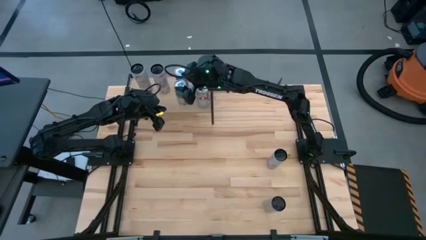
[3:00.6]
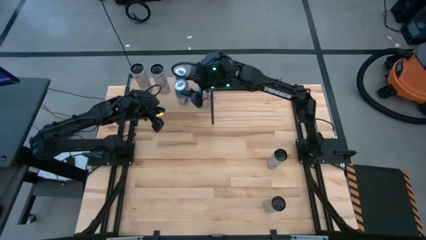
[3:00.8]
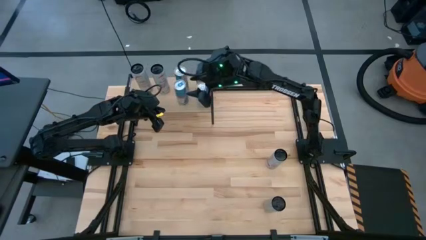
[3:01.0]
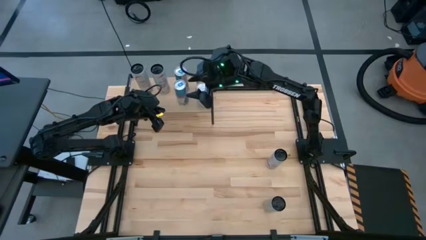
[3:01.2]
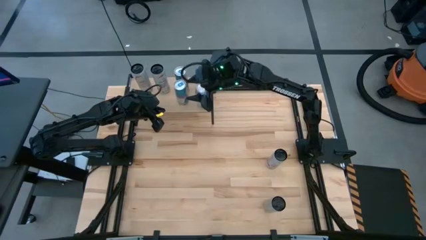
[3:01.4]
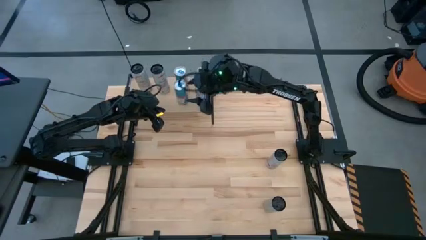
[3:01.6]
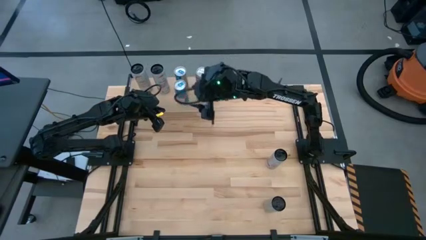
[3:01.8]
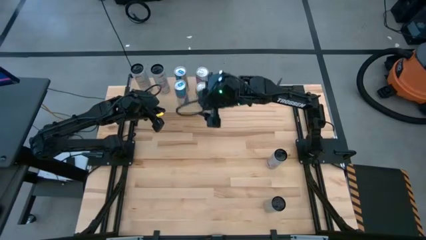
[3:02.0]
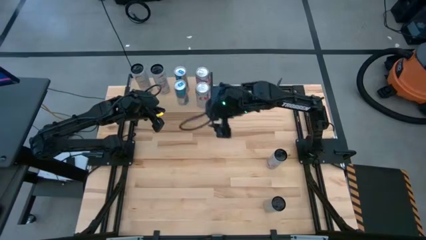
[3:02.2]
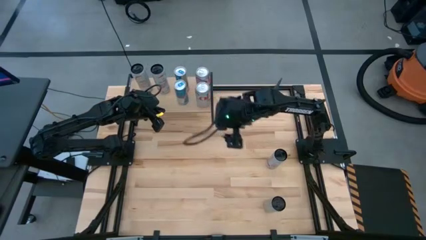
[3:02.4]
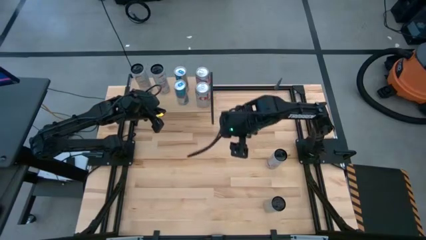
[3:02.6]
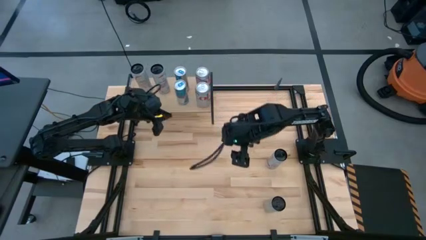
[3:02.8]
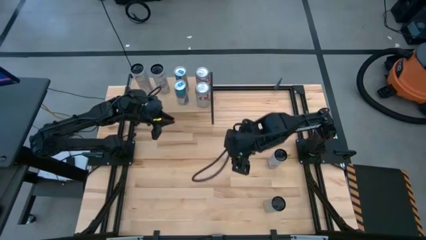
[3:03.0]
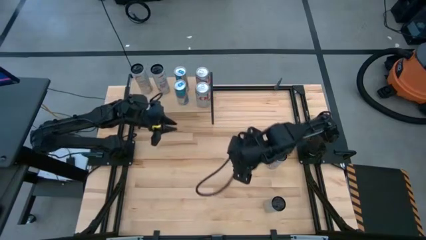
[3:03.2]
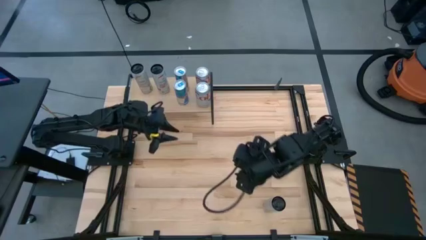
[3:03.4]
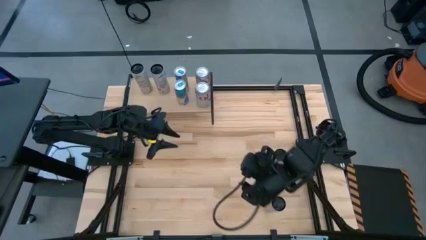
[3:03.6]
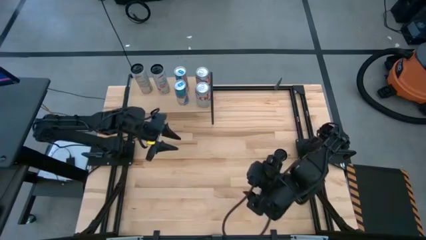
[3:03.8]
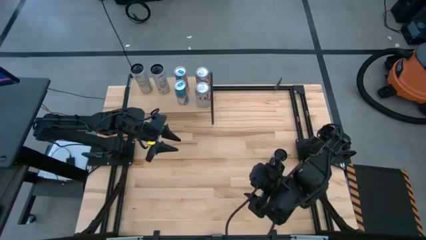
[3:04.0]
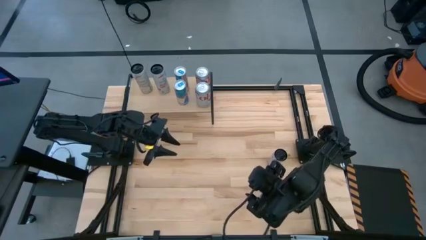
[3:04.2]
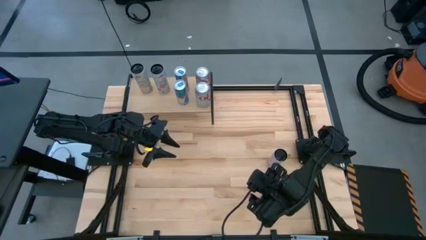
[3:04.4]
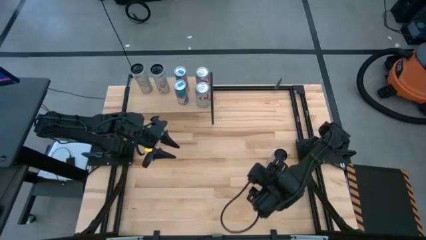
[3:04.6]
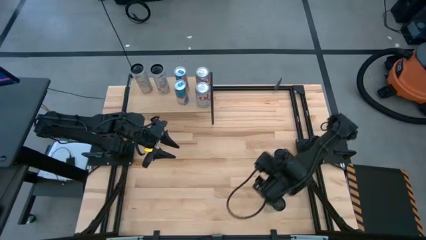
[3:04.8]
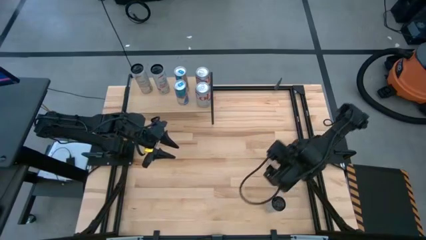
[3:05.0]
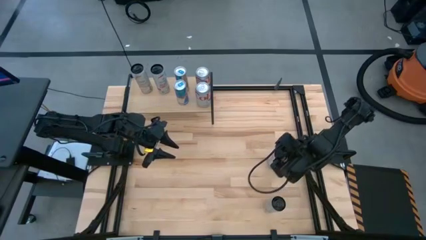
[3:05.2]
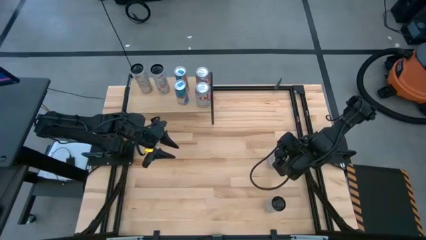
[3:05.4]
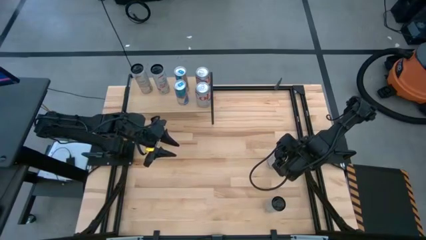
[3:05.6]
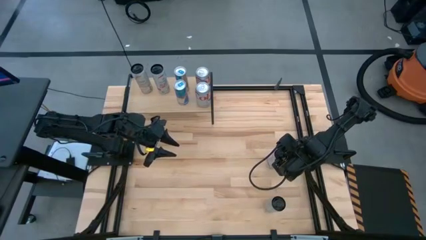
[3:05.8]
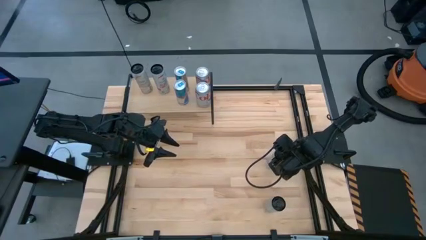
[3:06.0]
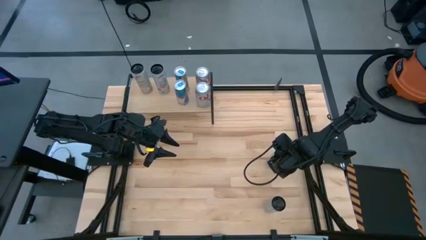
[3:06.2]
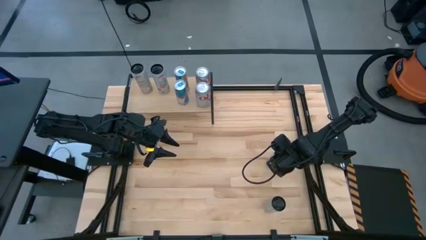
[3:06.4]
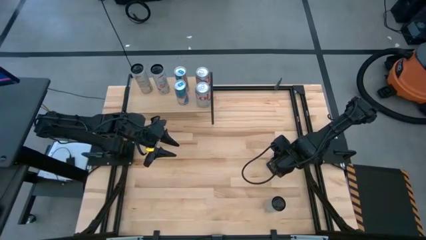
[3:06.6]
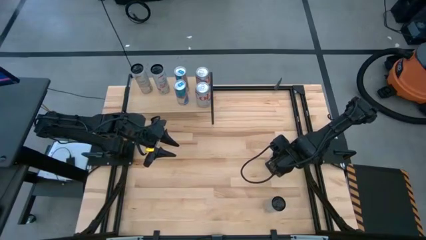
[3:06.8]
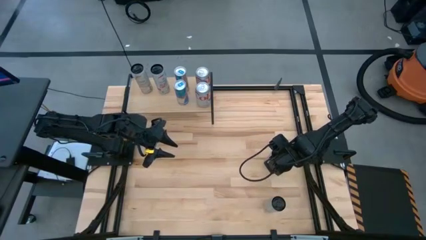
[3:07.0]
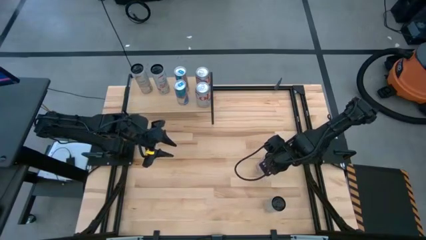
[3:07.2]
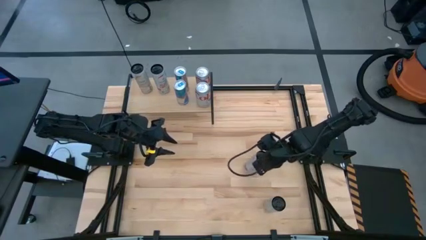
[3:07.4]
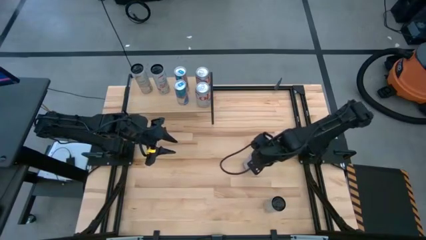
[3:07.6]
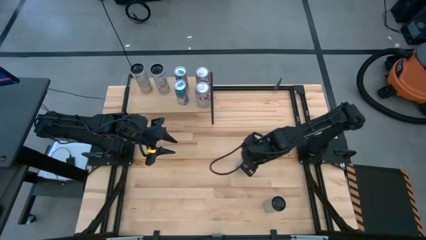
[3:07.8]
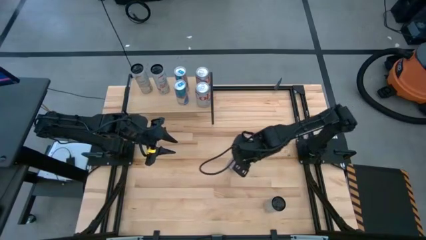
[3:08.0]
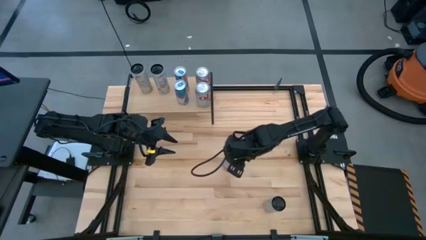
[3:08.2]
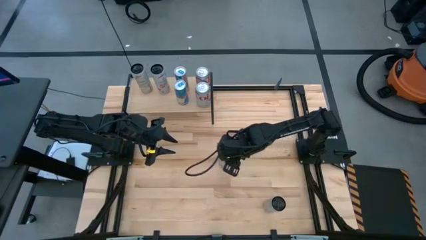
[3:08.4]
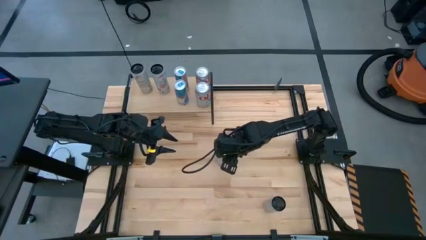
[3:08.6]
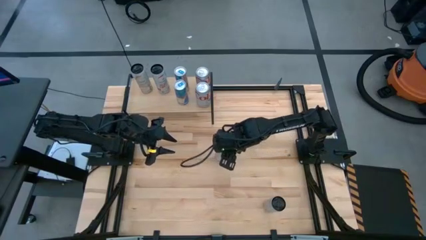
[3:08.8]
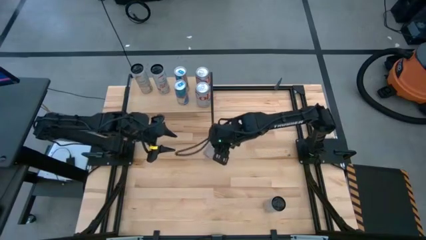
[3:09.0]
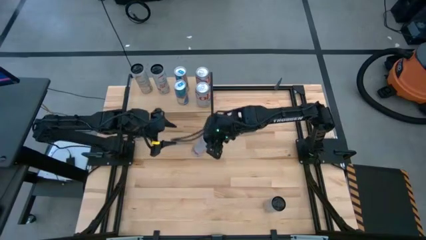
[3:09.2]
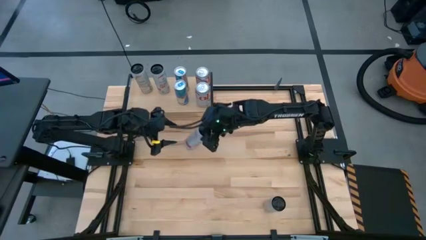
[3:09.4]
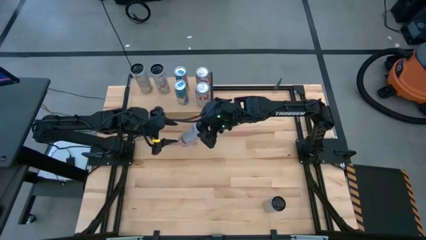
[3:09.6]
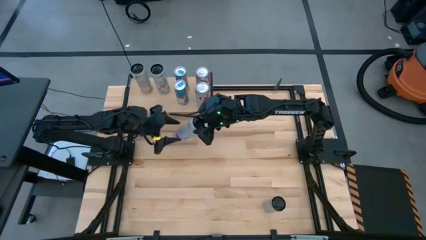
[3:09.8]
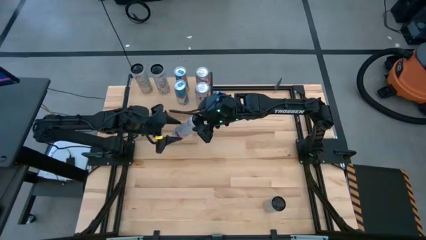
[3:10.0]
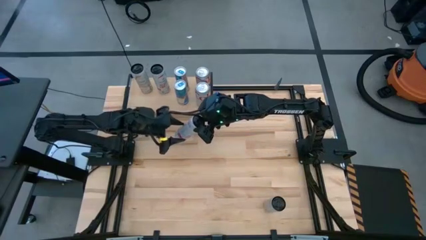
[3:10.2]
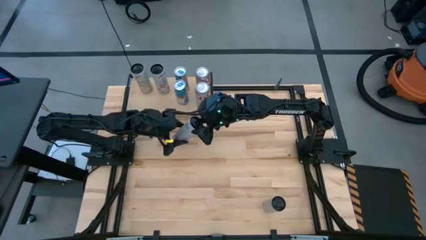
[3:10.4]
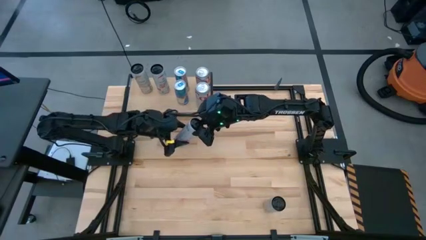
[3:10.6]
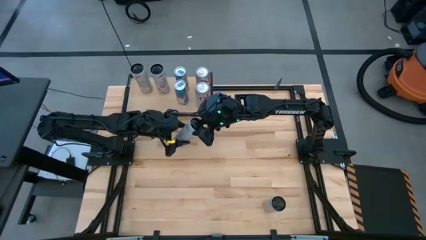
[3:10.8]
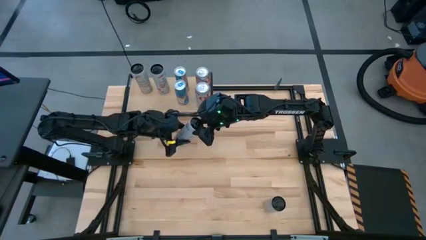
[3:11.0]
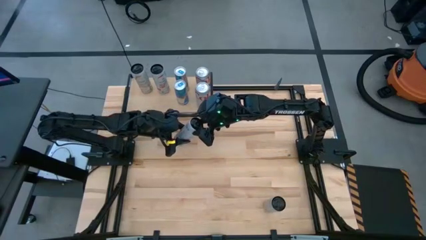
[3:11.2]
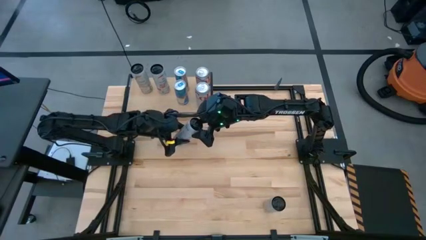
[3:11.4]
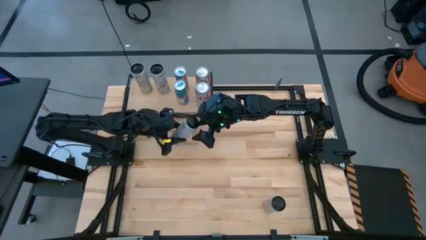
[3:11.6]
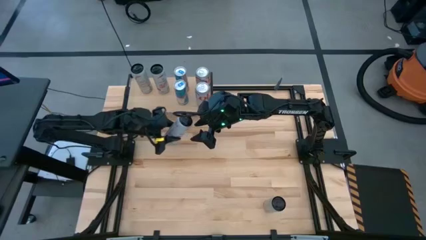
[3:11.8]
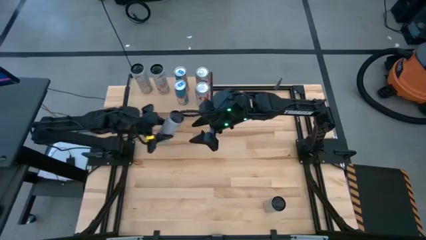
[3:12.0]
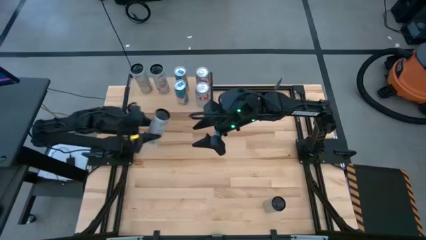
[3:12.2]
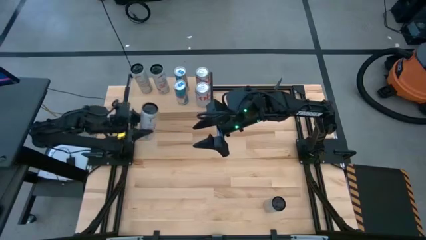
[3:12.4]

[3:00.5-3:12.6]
Task: Place canned beverage on shelf
Put the white-pink soda can on the shelf aligned with the other white-pink soda can

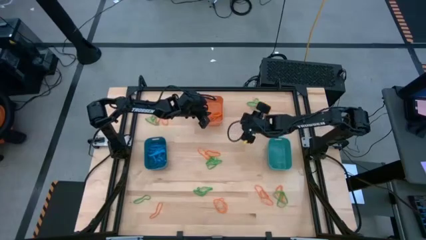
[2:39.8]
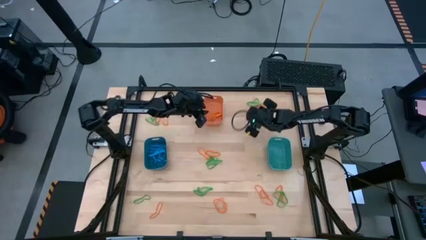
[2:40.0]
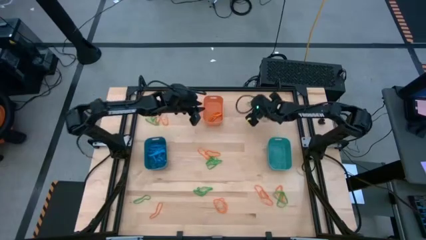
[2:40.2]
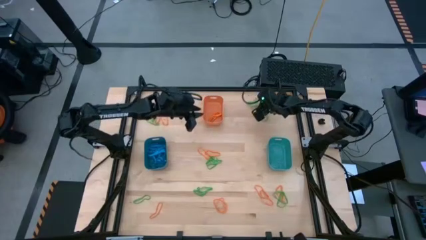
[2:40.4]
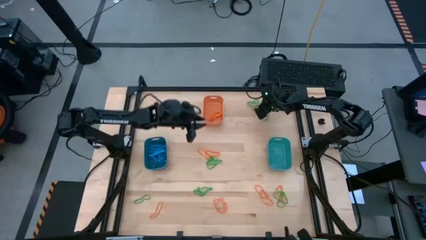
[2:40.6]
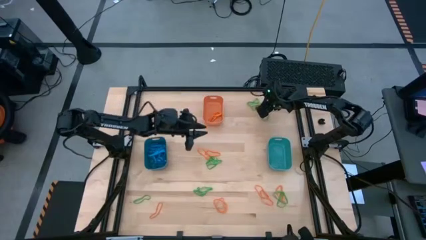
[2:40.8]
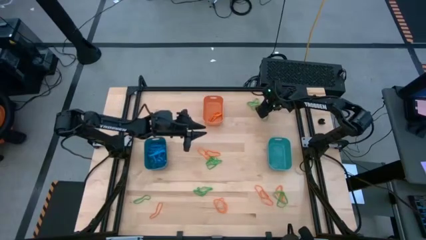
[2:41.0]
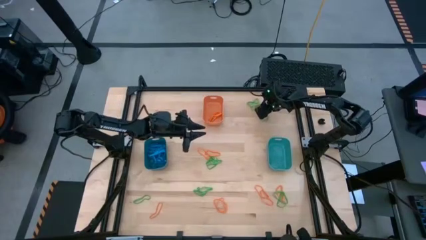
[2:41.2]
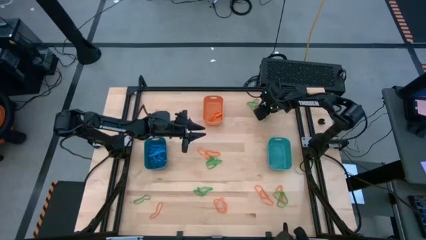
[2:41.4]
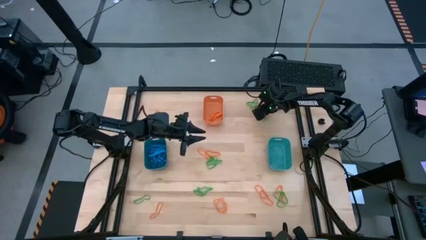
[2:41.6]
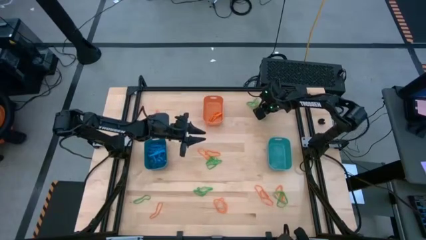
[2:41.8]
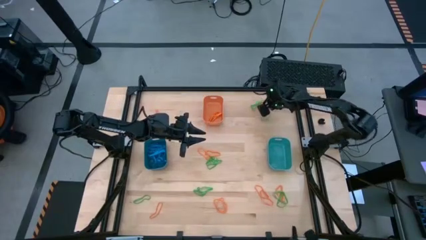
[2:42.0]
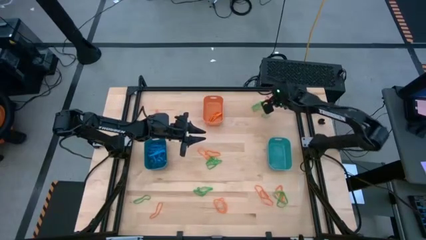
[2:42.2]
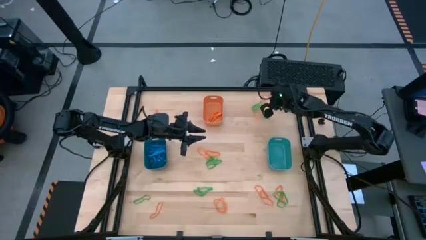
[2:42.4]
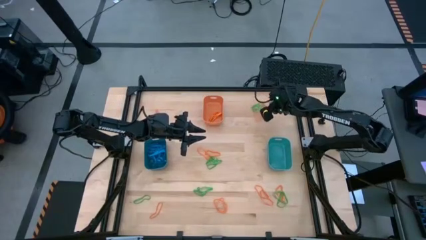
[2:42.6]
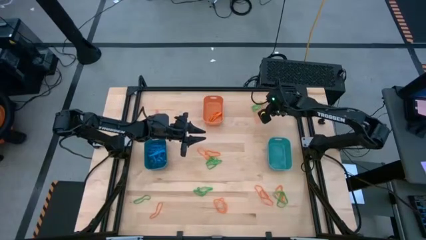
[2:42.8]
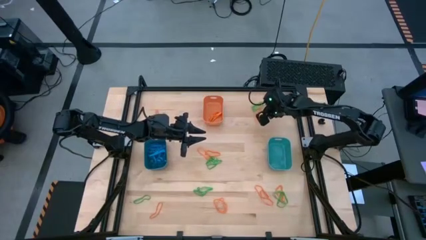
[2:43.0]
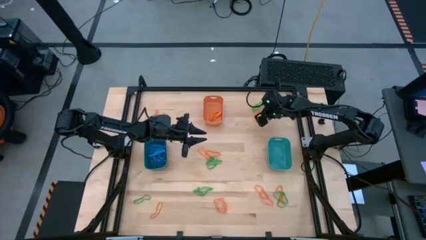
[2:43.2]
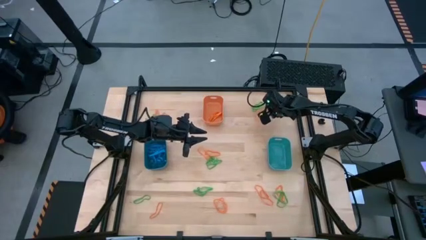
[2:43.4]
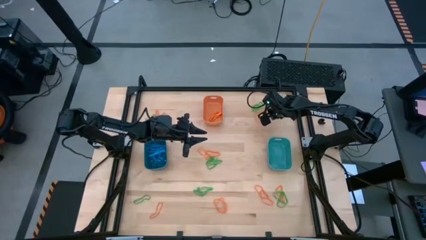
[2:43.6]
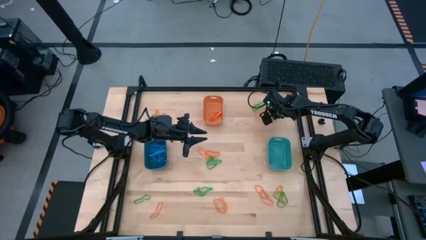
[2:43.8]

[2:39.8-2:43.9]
Task: Sort rubber bands into baskets
Put the orange rubber band into the orange bin
